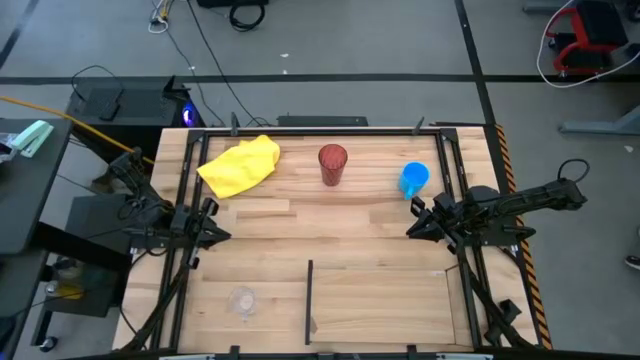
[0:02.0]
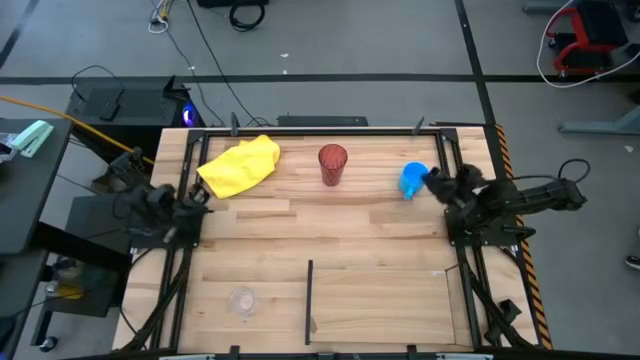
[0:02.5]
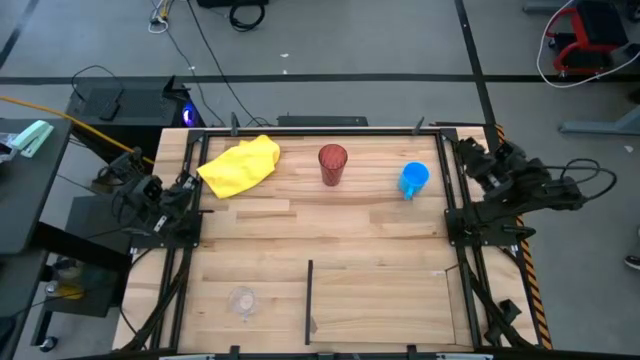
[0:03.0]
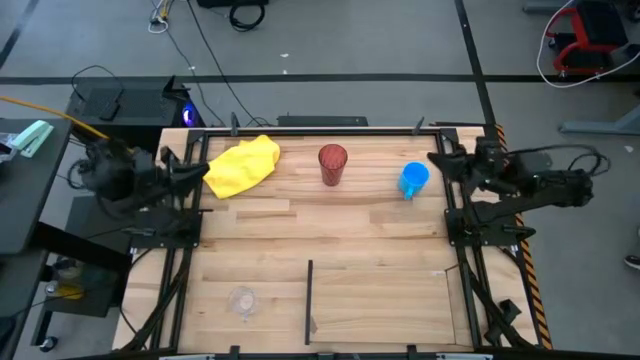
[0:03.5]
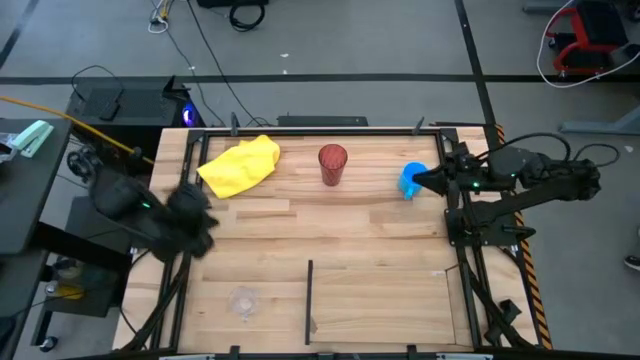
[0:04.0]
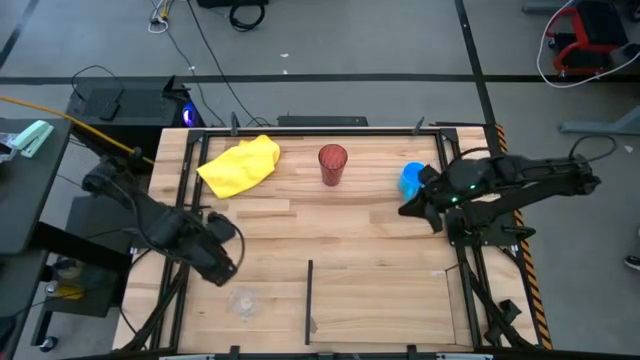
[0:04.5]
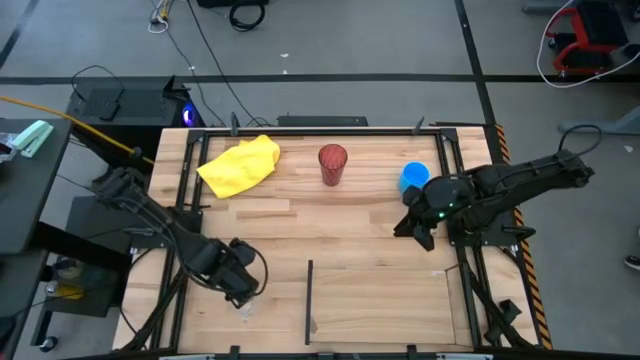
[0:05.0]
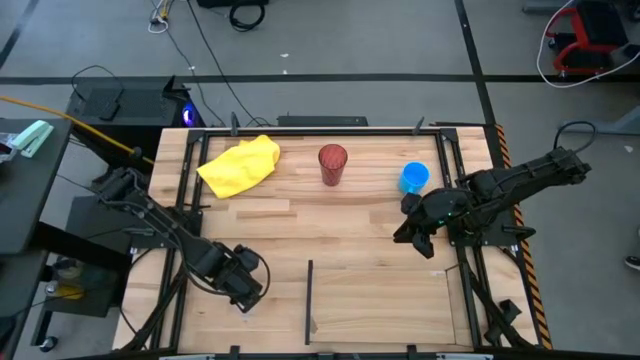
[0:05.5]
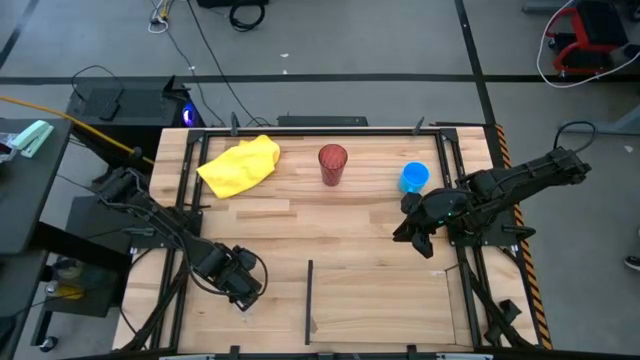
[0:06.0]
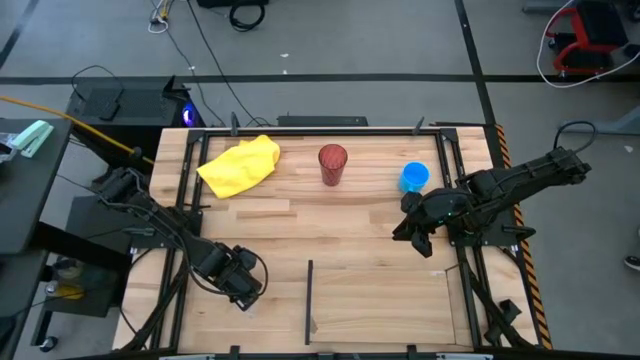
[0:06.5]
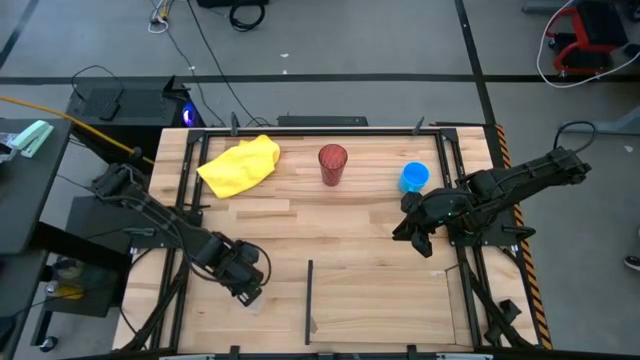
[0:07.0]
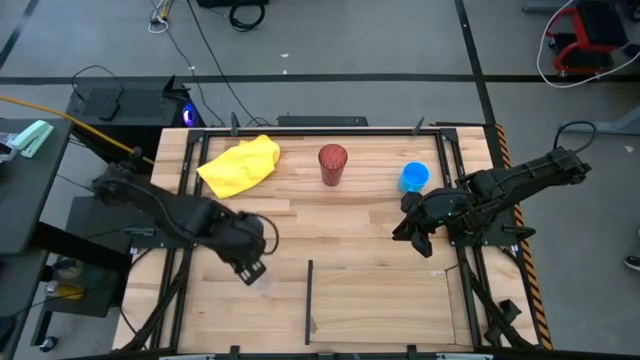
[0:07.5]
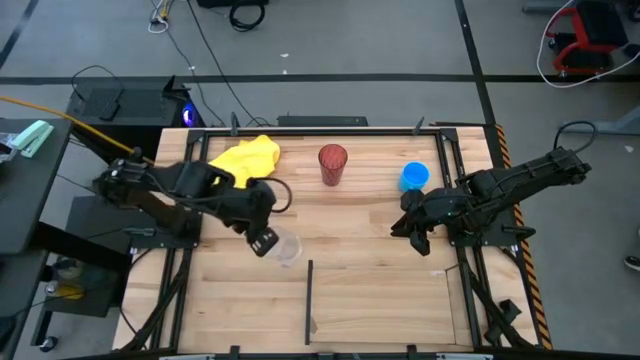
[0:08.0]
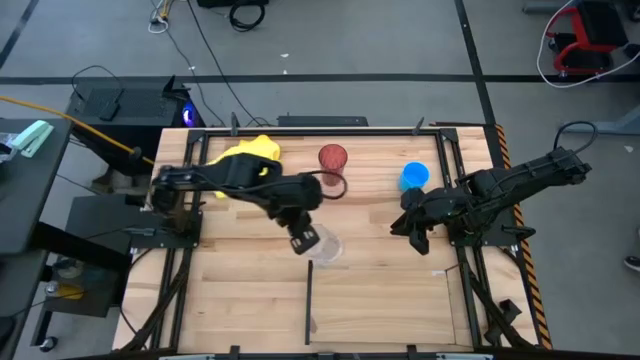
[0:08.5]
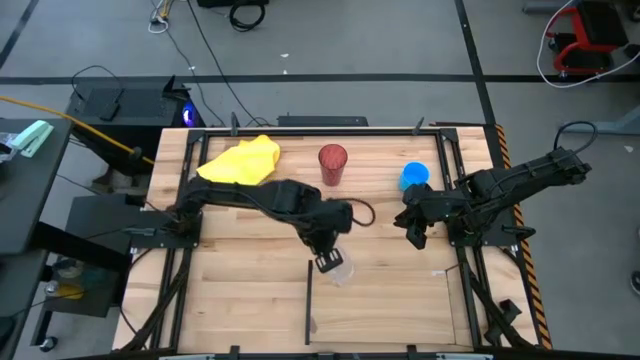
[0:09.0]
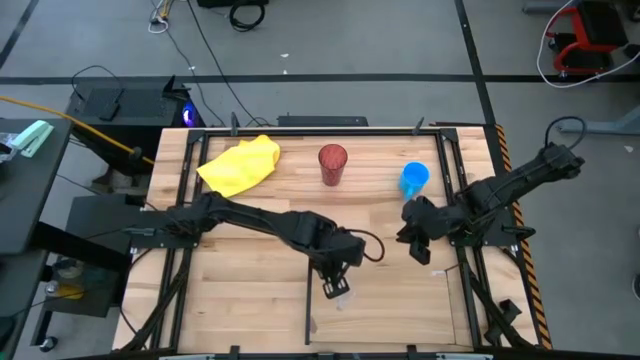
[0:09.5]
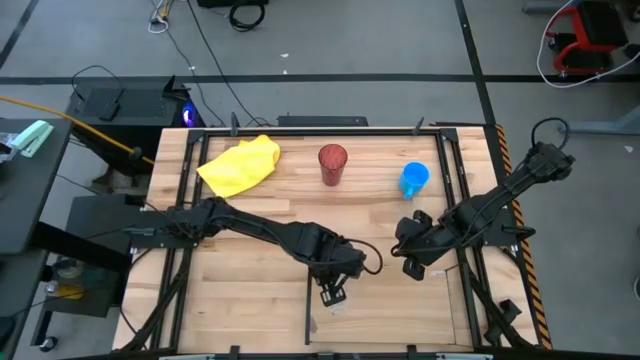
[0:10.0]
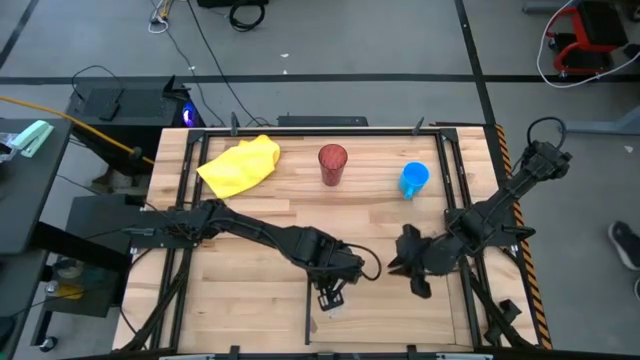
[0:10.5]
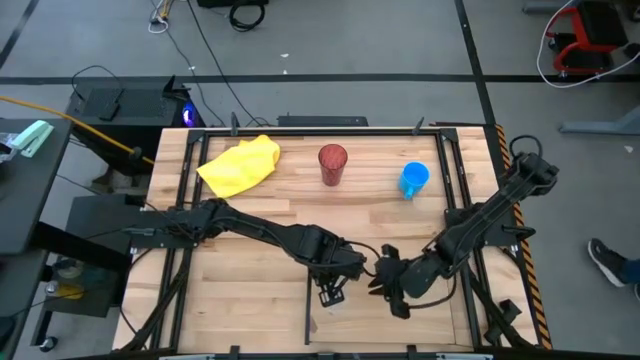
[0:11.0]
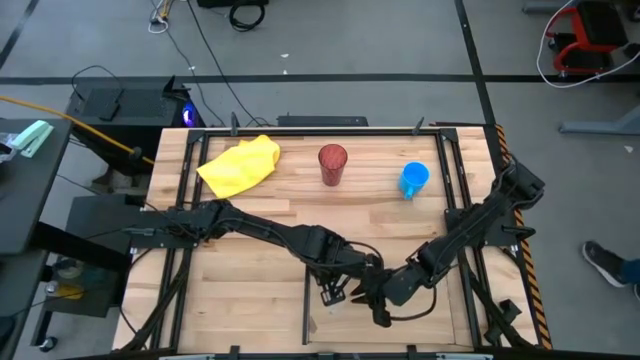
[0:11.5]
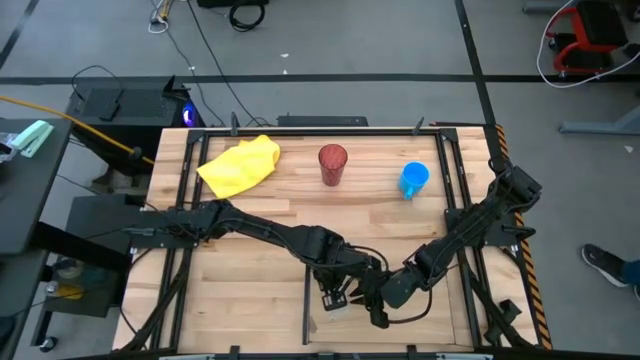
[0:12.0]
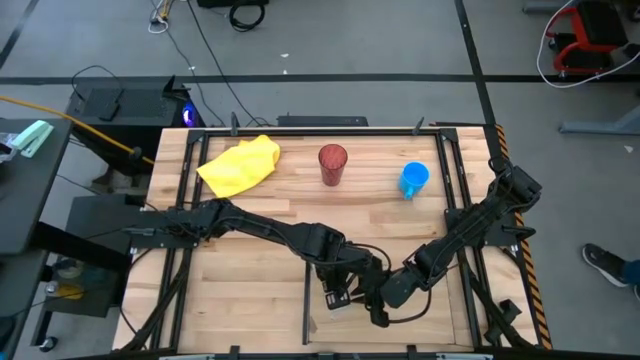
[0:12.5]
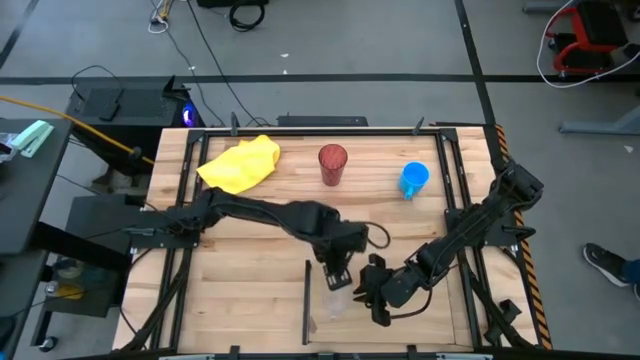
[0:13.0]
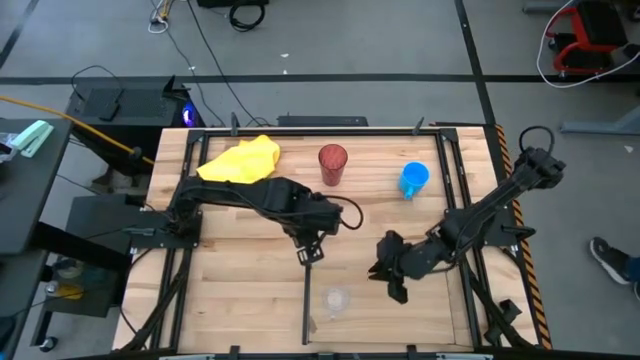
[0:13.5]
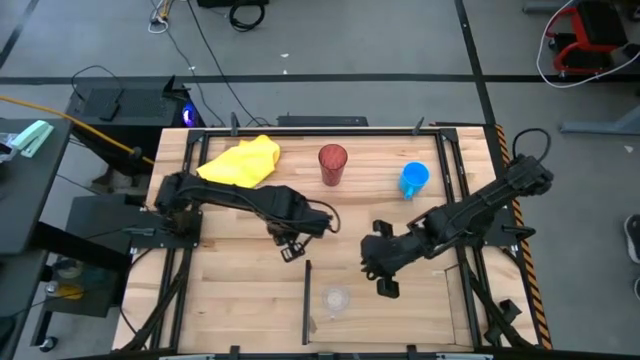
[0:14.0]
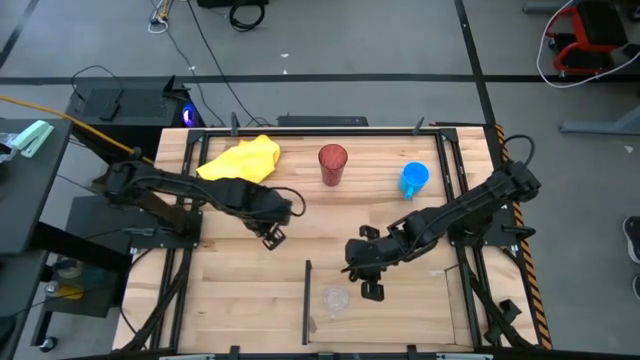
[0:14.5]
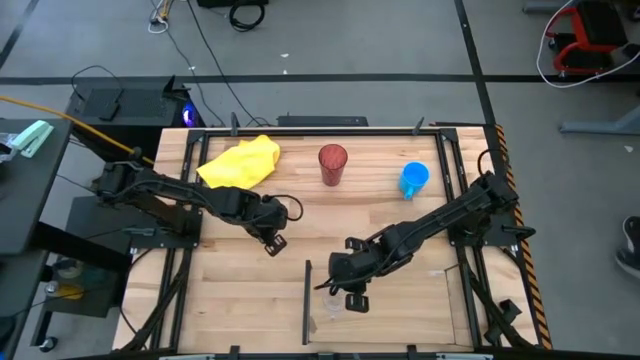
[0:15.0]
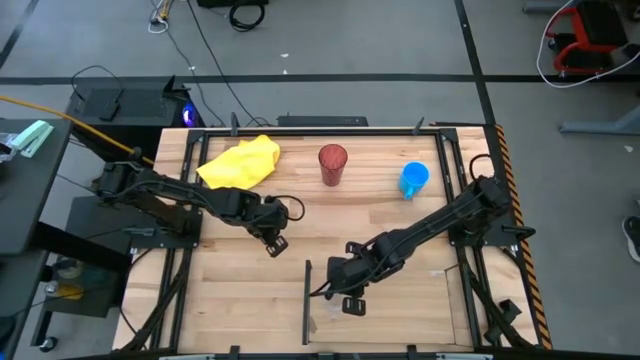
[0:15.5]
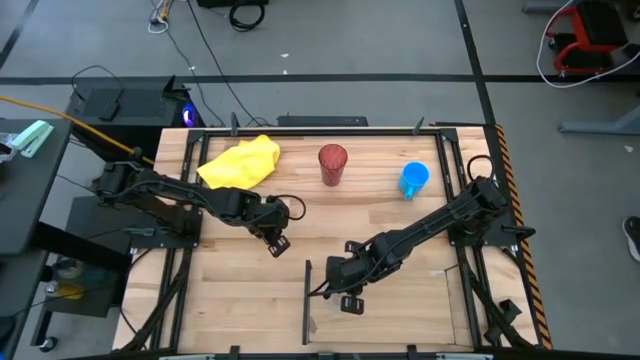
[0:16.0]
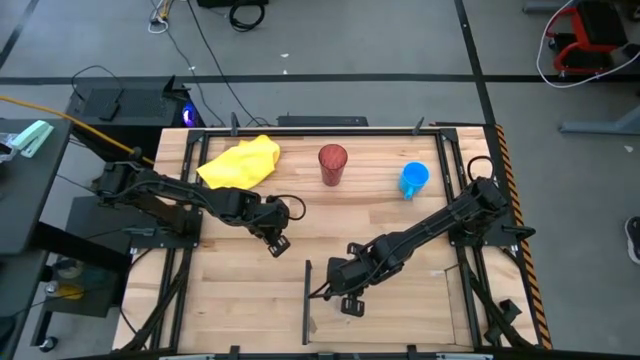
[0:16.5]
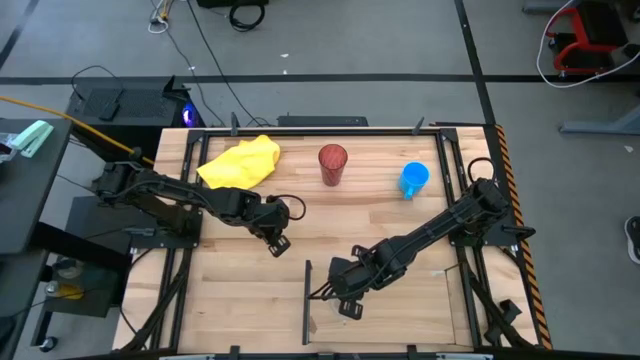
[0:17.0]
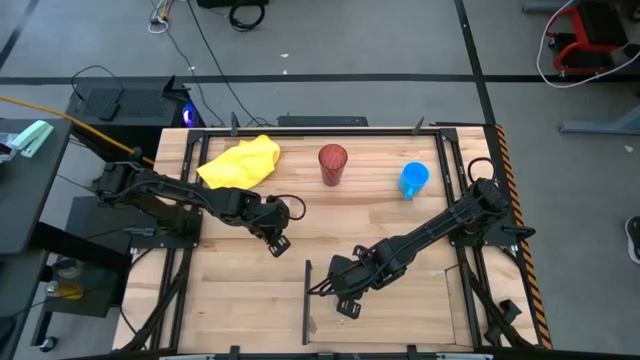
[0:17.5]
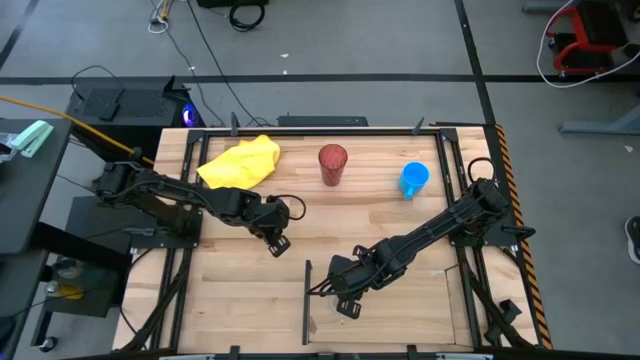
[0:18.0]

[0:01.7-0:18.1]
Task: Stack small to large cups/mugs on shelf
Put the transparent mug on the shelf

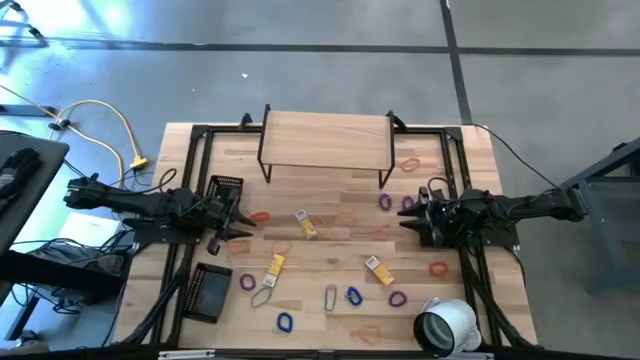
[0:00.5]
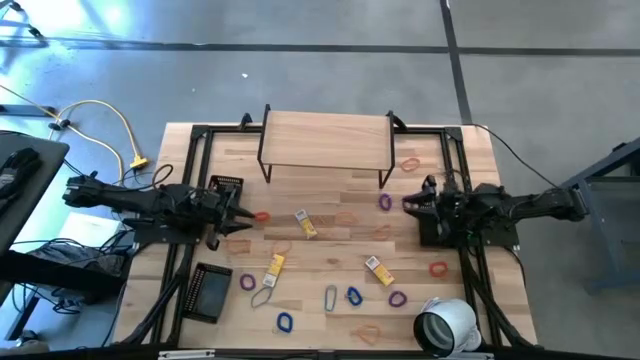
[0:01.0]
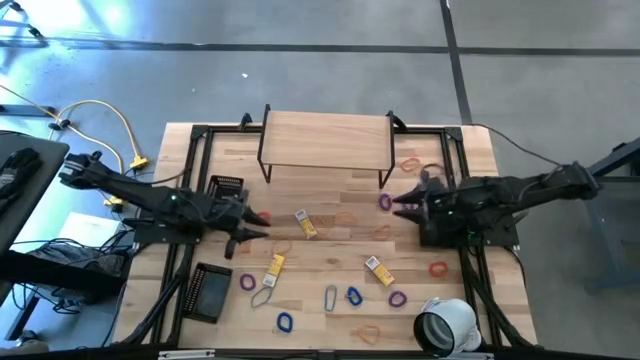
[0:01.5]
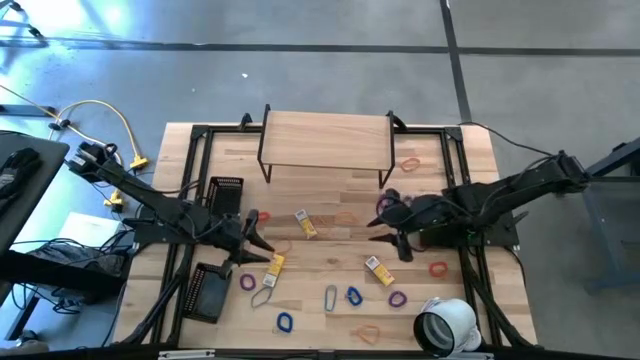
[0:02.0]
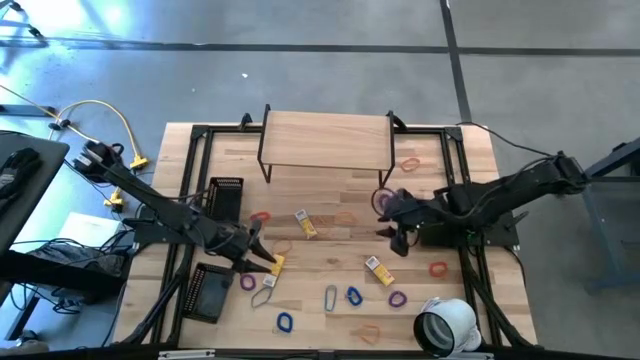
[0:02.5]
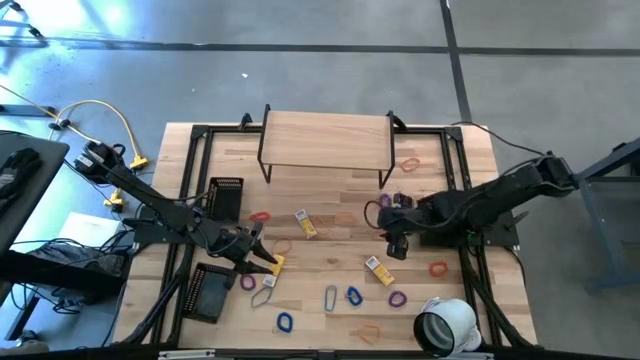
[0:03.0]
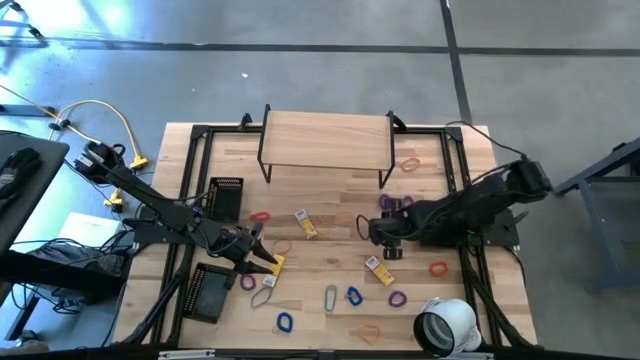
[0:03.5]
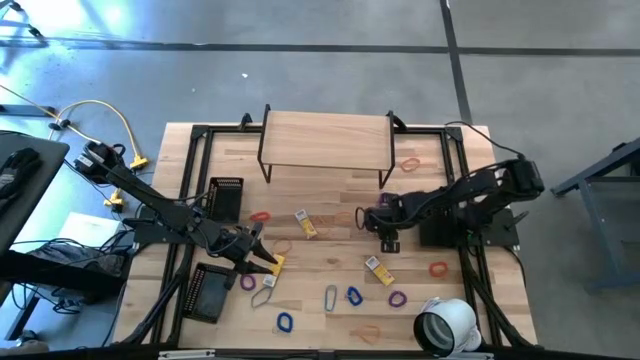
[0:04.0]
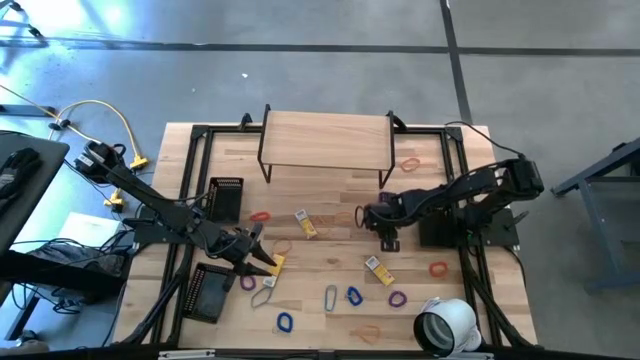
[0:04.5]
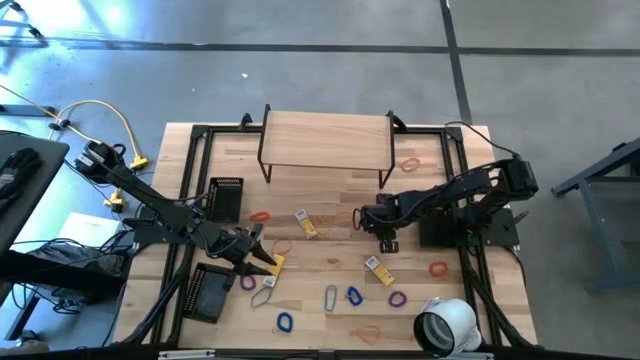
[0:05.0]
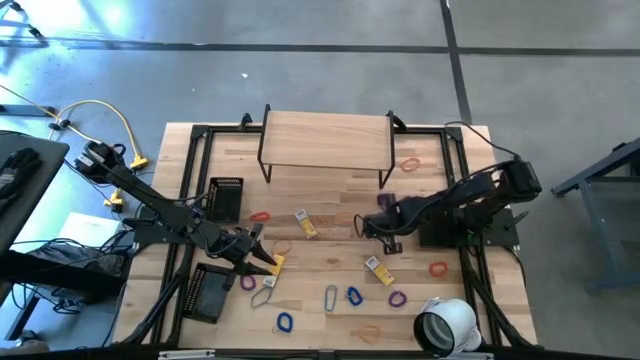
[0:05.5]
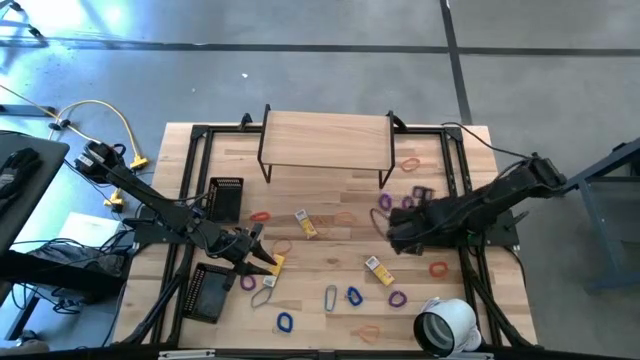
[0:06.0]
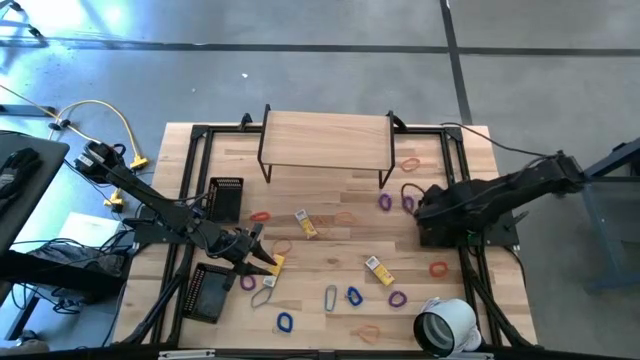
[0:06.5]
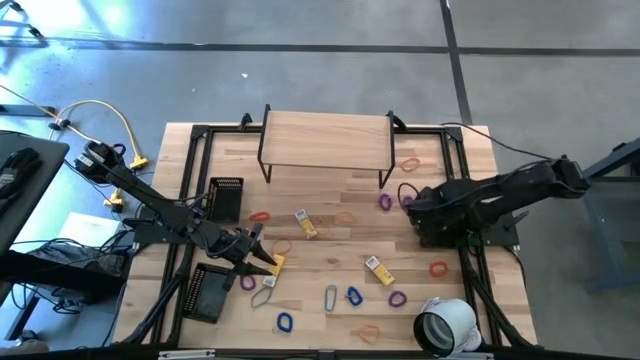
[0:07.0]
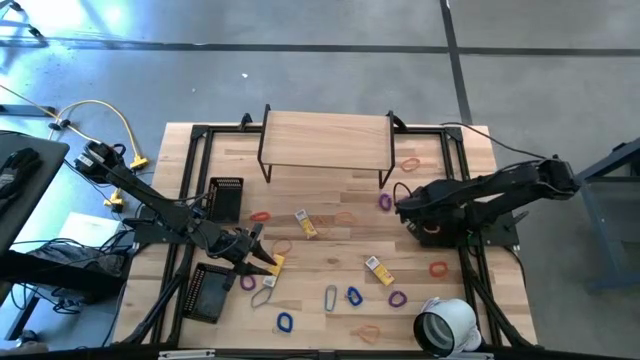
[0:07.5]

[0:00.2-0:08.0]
Task: Pick & Place Office Desk Supplies
Put the orange rubber band into the top right black bin
